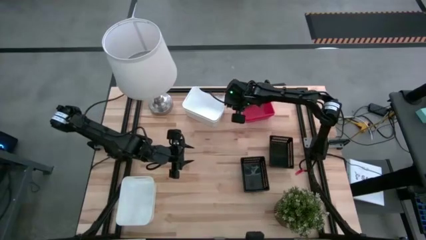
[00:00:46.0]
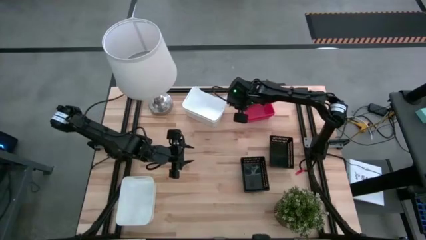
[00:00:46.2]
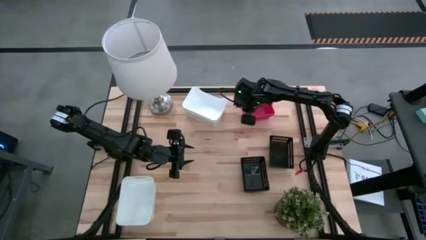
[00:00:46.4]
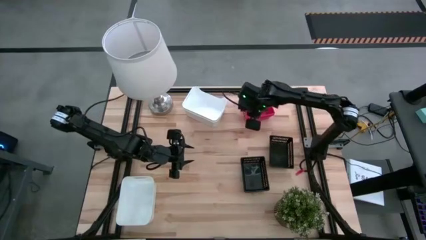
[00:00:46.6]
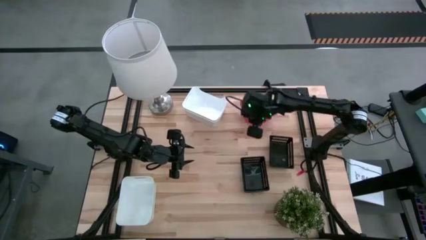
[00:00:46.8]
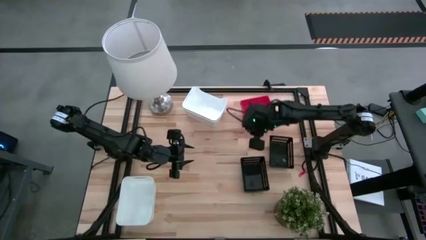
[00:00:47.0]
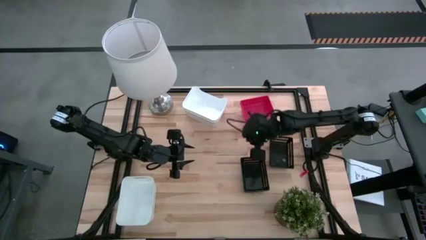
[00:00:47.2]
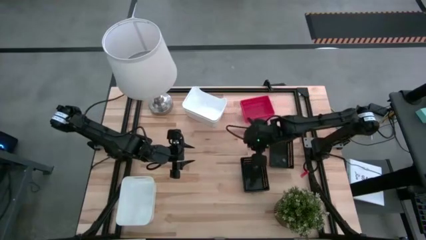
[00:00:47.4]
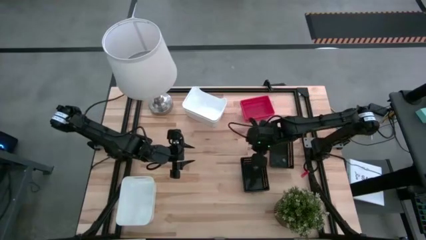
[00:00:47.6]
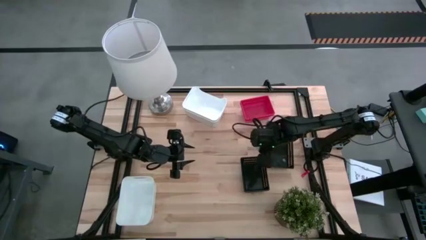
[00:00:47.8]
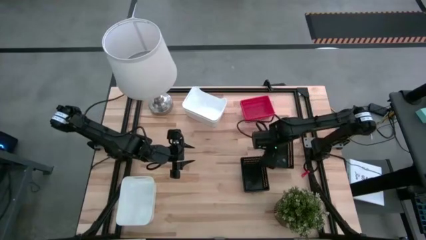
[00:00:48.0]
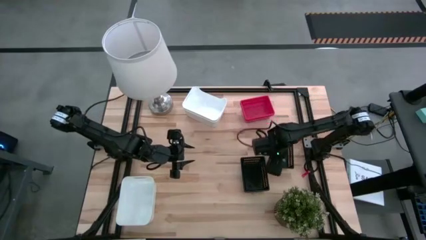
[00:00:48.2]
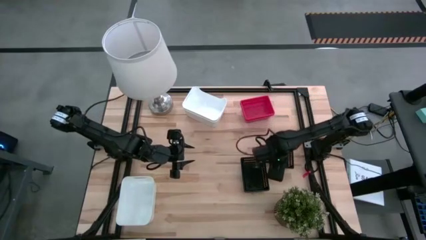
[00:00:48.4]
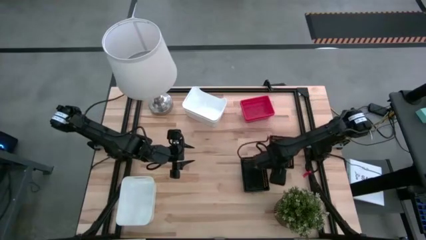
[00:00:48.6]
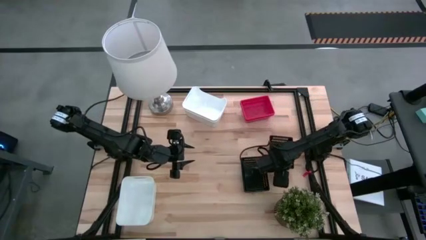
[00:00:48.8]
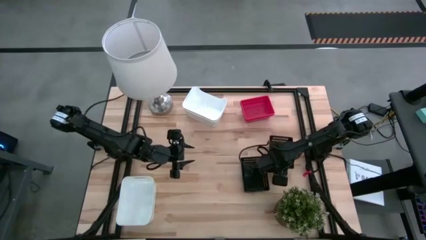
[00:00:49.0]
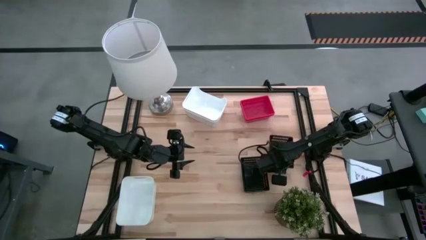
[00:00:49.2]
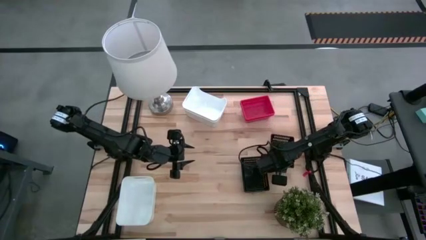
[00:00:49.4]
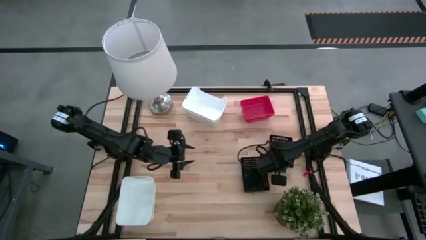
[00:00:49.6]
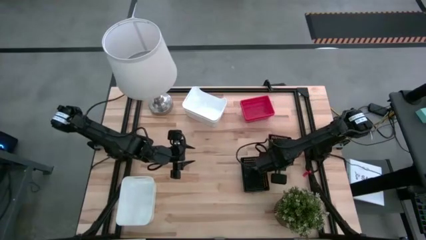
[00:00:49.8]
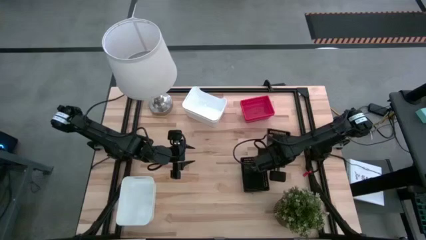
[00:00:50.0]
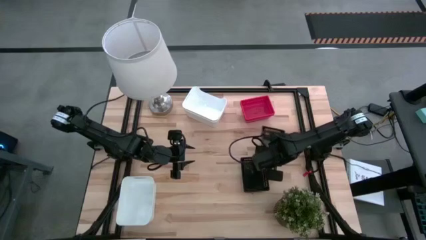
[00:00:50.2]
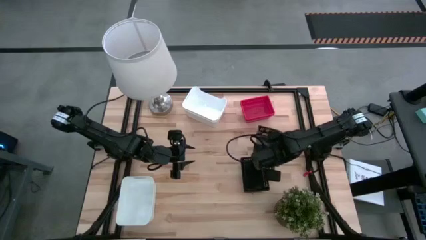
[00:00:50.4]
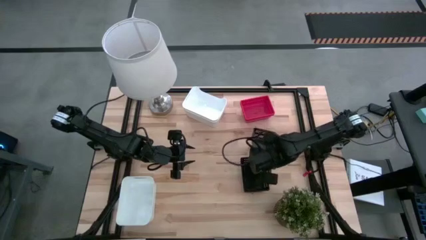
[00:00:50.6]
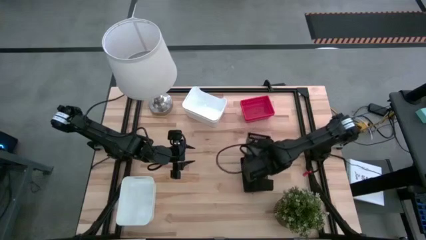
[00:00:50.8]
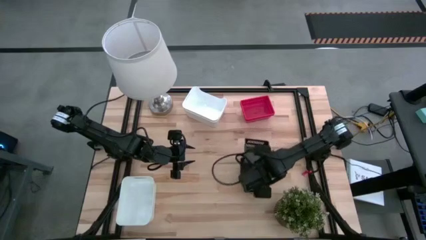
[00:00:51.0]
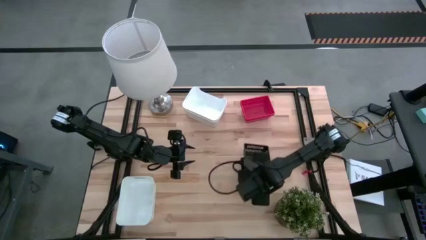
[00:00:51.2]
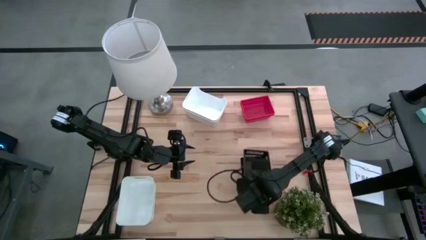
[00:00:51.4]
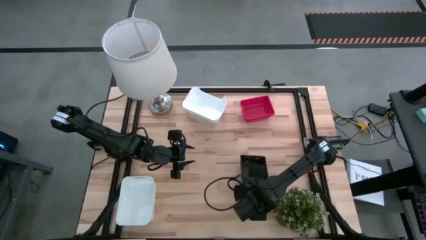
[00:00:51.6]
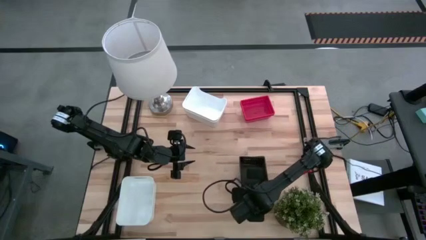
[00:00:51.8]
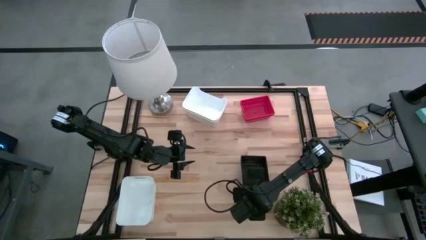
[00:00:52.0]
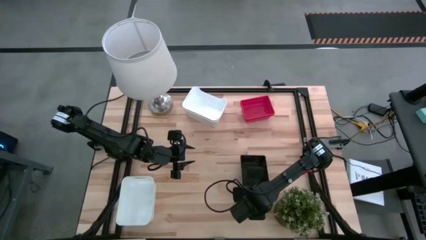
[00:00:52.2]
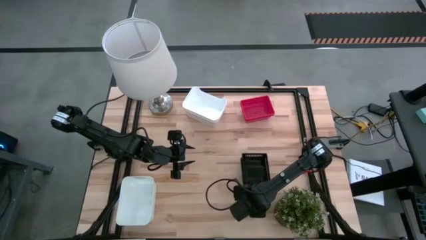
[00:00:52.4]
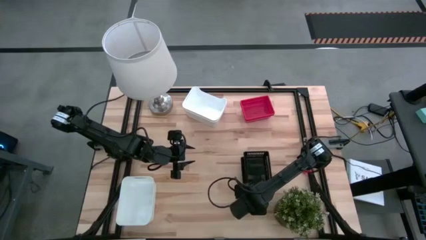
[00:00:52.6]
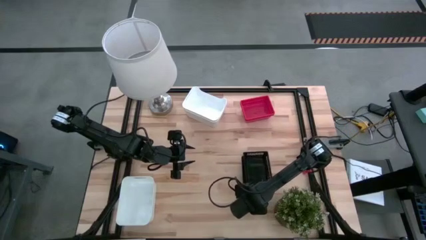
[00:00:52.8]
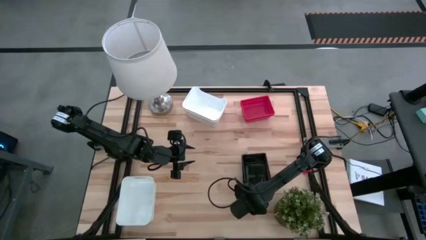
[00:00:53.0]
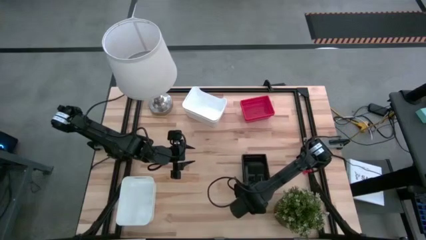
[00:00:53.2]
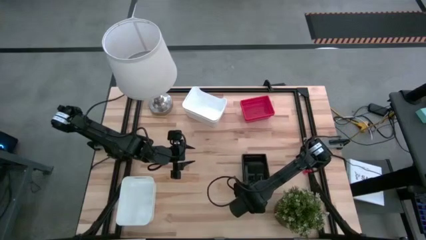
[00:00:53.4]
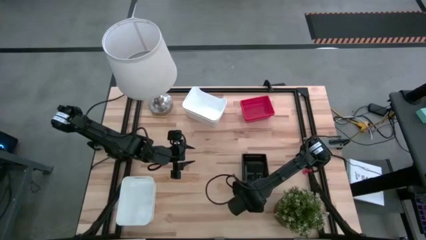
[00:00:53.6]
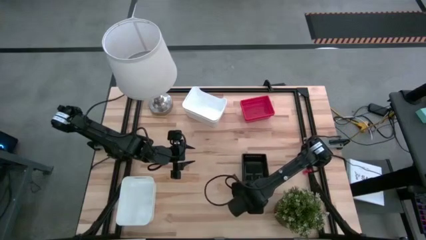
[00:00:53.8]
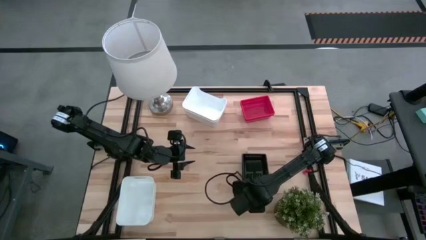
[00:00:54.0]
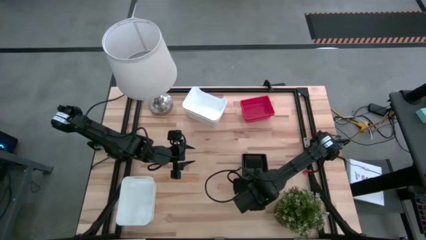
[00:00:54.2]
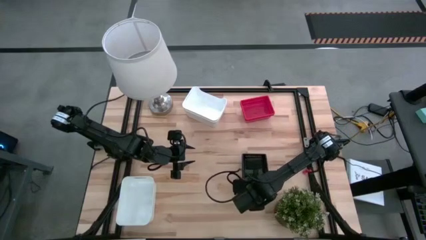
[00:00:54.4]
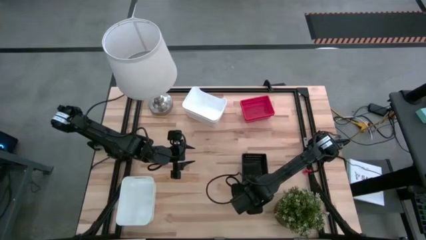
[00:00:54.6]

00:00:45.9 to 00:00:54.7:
Stack the right black bin on top of the left black bin
